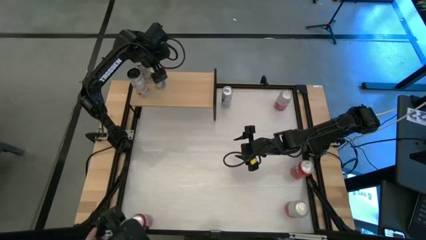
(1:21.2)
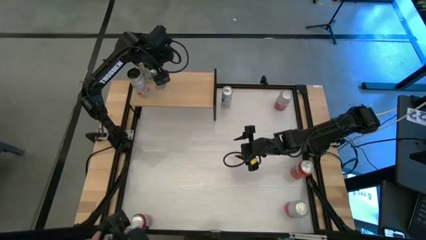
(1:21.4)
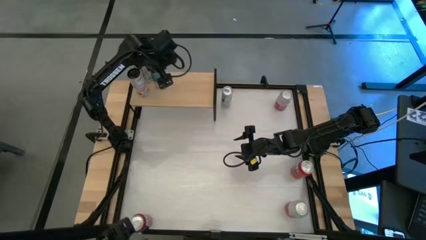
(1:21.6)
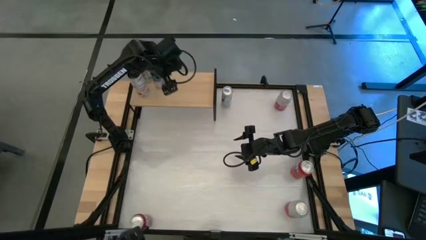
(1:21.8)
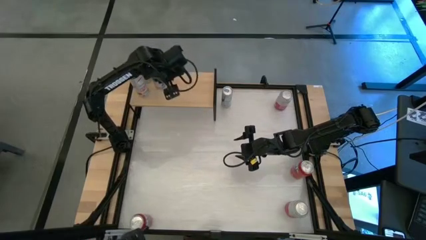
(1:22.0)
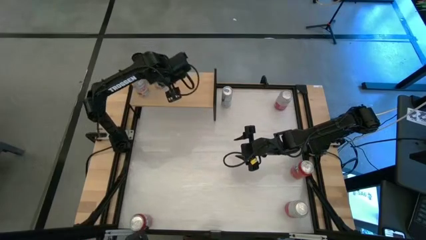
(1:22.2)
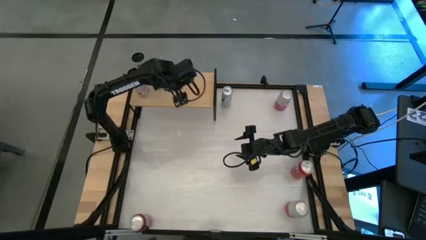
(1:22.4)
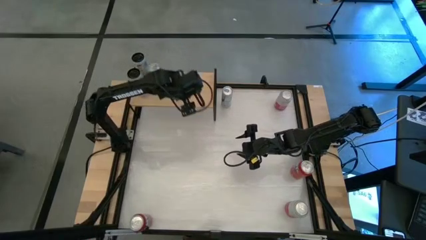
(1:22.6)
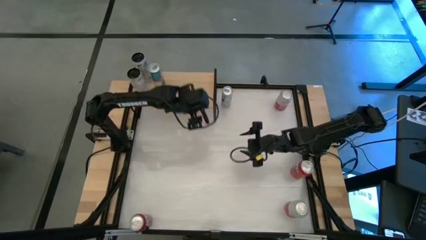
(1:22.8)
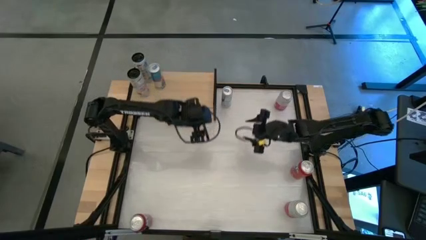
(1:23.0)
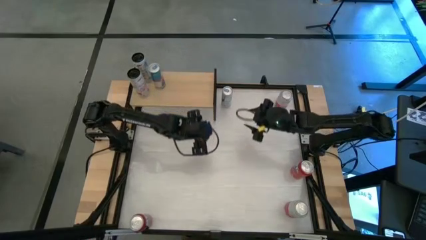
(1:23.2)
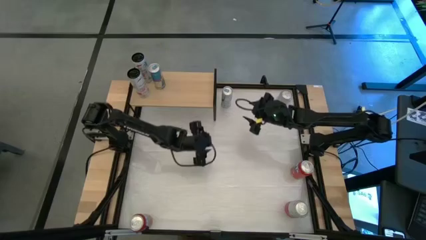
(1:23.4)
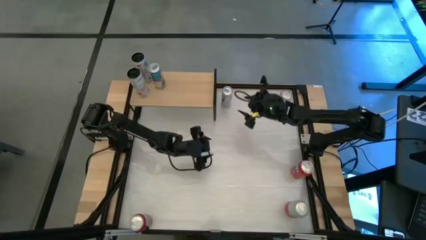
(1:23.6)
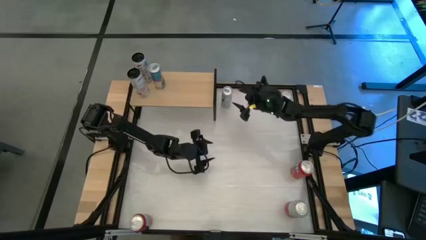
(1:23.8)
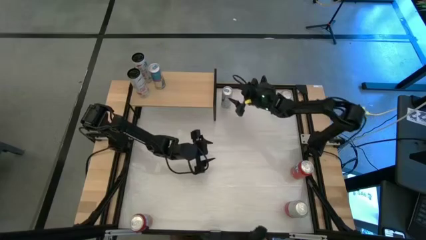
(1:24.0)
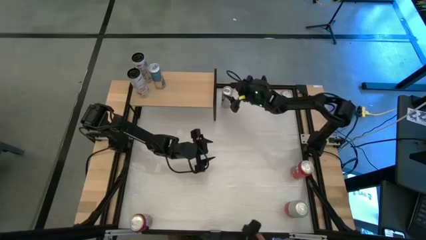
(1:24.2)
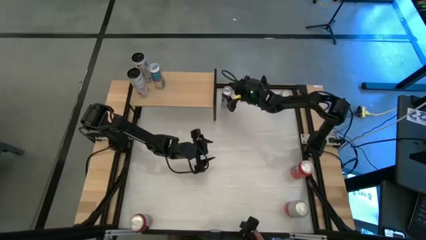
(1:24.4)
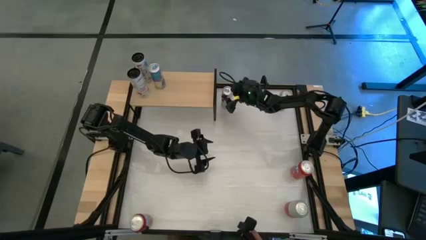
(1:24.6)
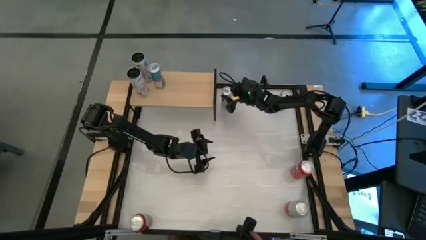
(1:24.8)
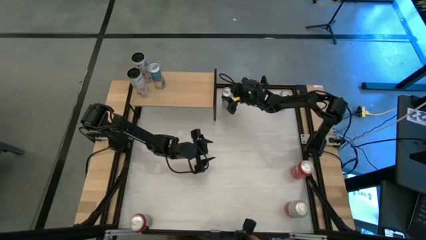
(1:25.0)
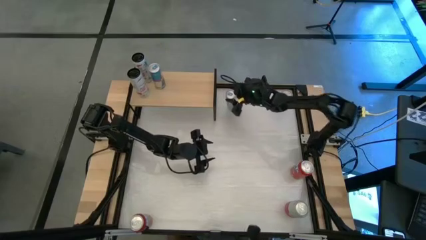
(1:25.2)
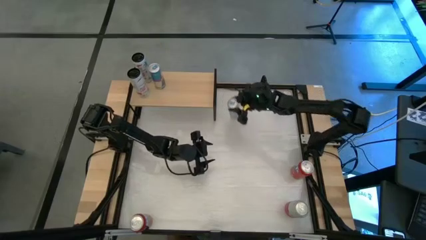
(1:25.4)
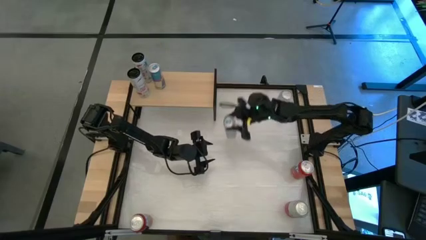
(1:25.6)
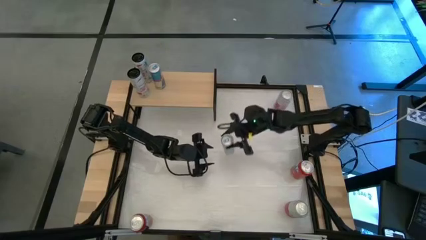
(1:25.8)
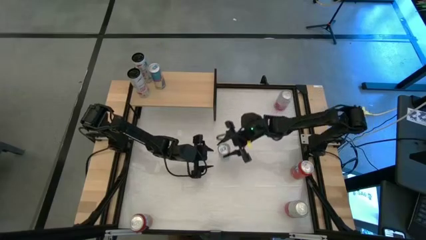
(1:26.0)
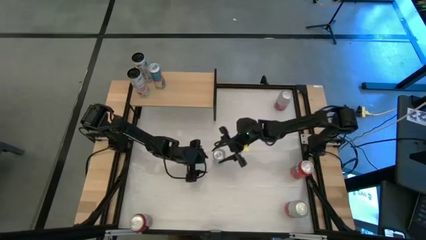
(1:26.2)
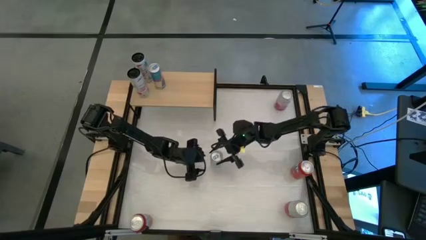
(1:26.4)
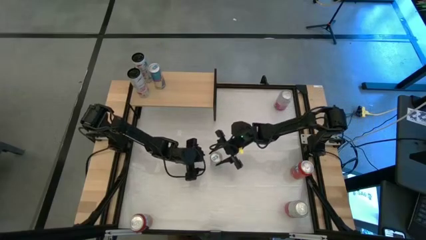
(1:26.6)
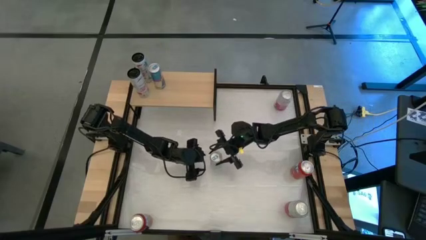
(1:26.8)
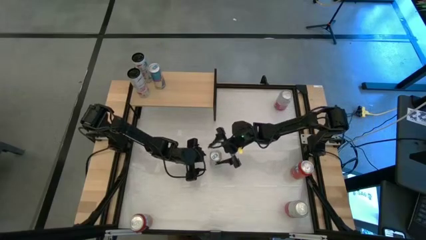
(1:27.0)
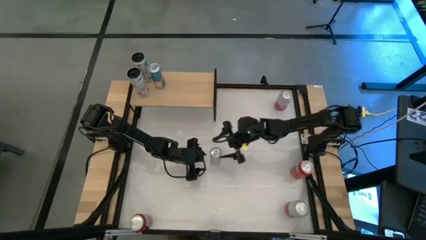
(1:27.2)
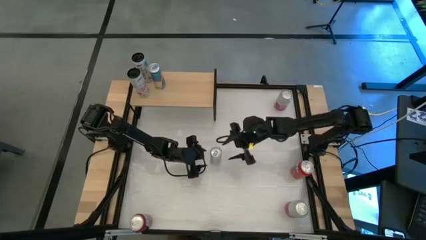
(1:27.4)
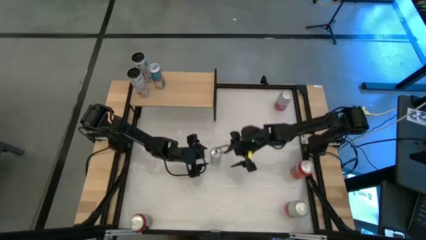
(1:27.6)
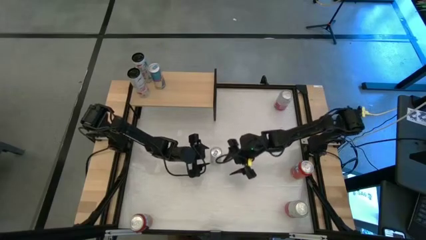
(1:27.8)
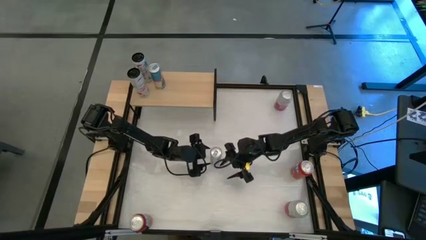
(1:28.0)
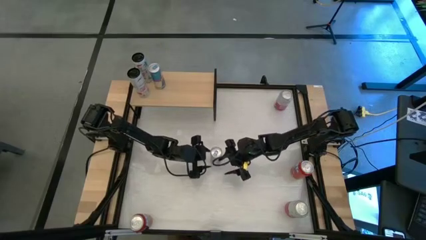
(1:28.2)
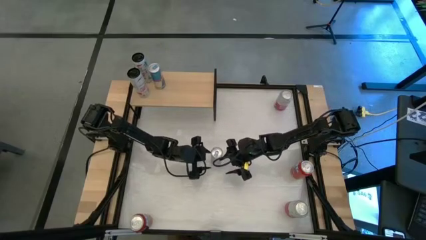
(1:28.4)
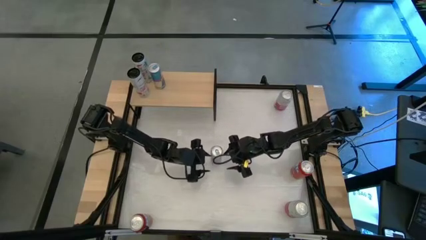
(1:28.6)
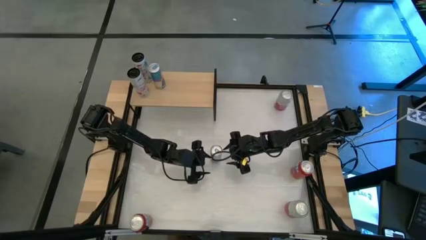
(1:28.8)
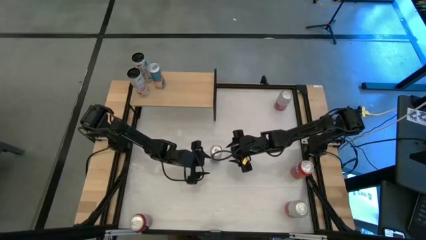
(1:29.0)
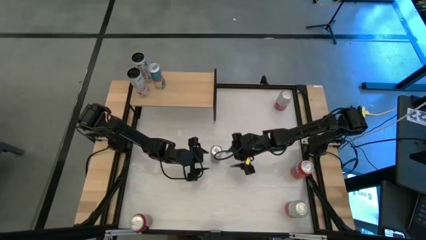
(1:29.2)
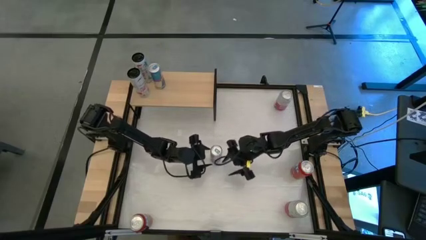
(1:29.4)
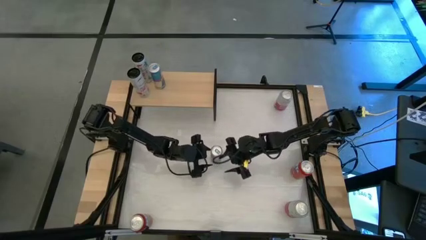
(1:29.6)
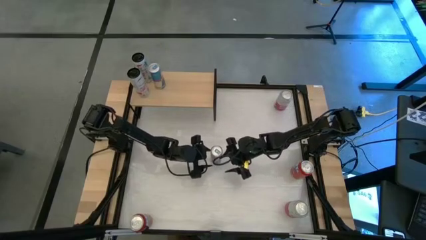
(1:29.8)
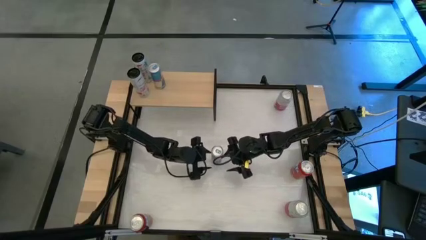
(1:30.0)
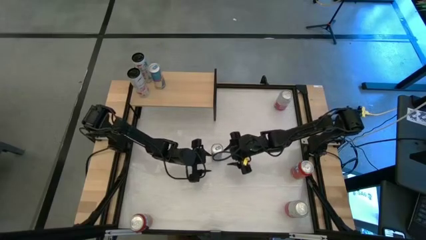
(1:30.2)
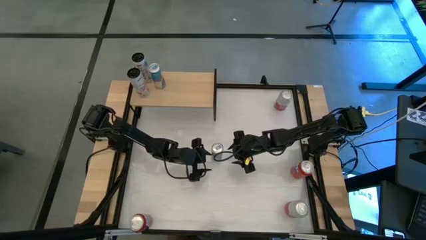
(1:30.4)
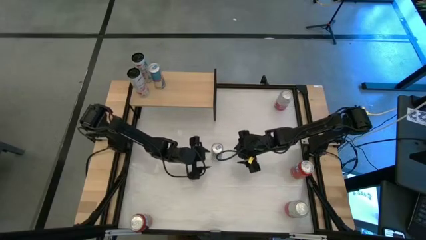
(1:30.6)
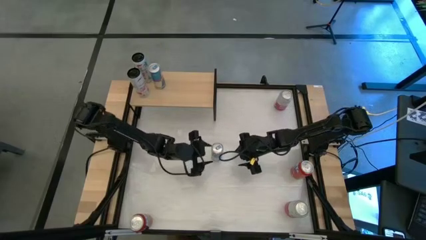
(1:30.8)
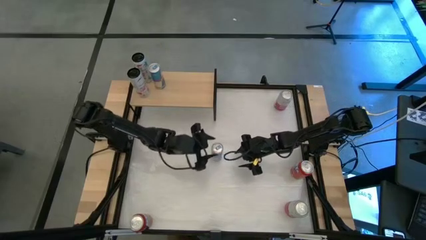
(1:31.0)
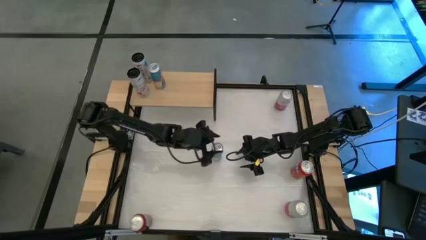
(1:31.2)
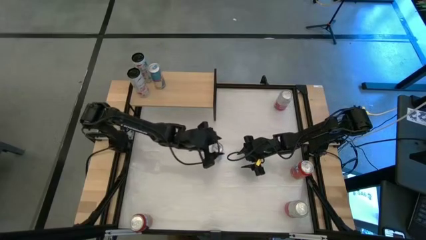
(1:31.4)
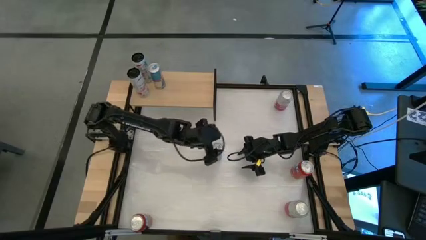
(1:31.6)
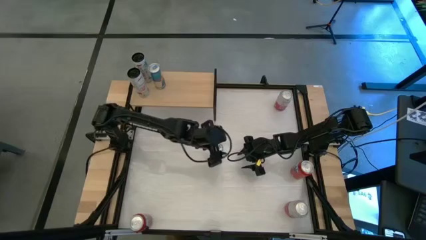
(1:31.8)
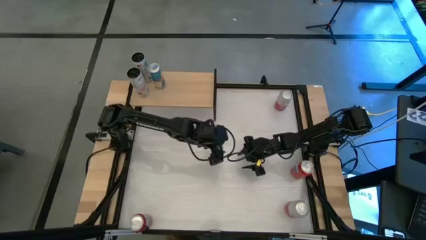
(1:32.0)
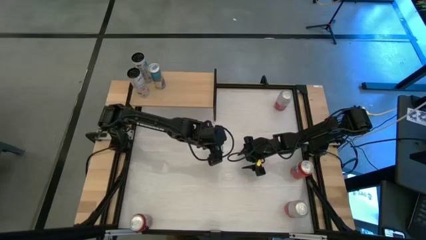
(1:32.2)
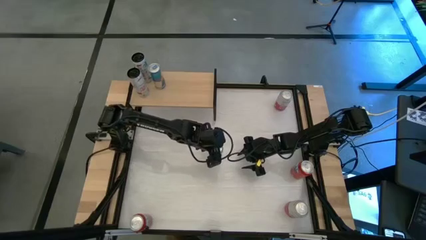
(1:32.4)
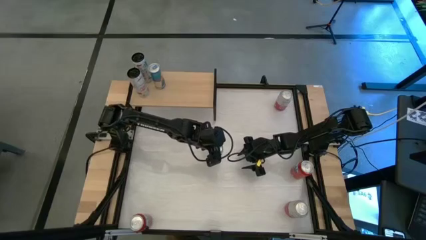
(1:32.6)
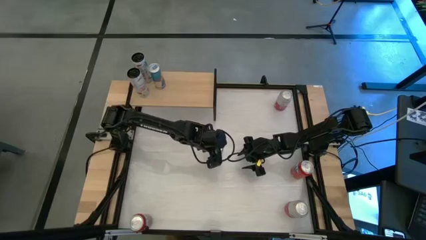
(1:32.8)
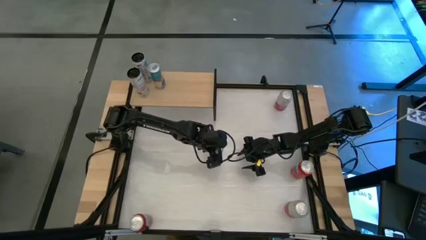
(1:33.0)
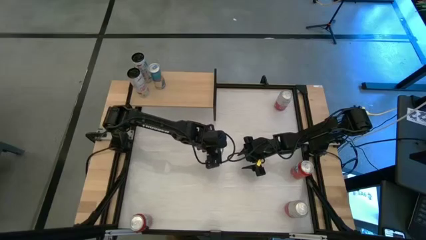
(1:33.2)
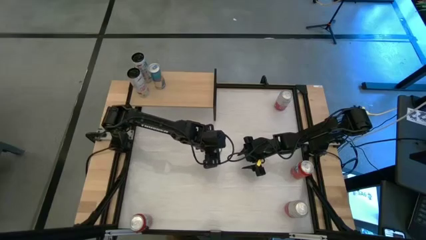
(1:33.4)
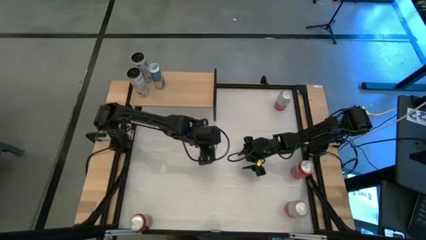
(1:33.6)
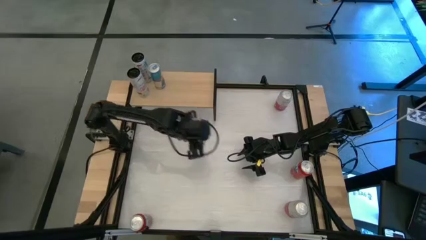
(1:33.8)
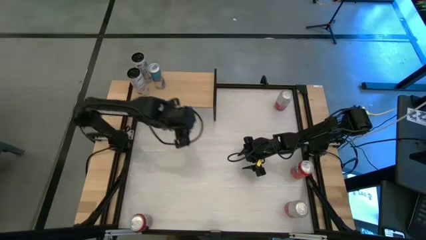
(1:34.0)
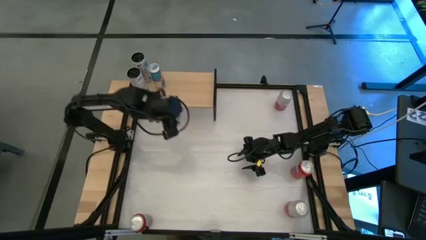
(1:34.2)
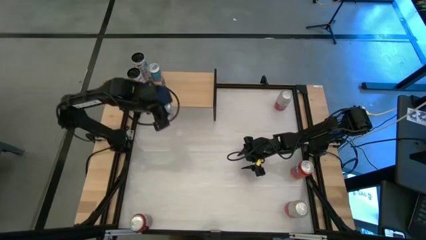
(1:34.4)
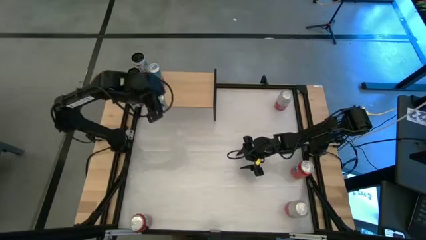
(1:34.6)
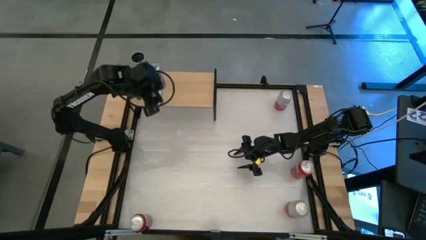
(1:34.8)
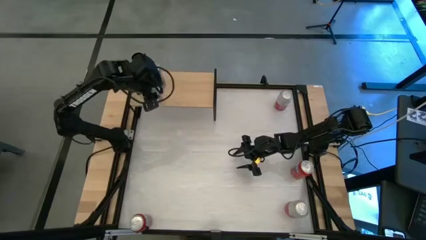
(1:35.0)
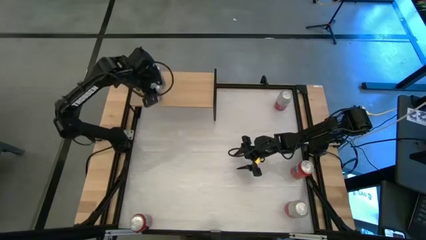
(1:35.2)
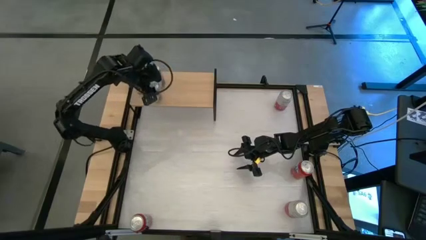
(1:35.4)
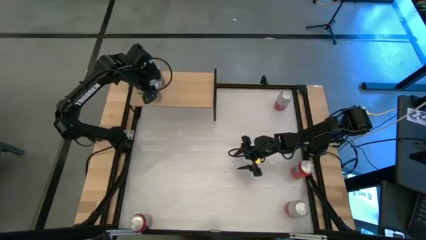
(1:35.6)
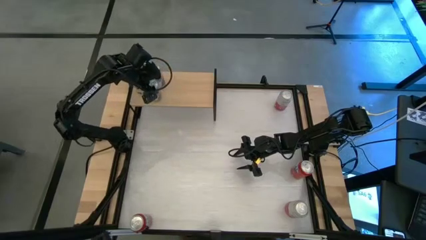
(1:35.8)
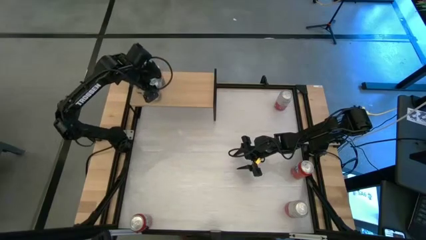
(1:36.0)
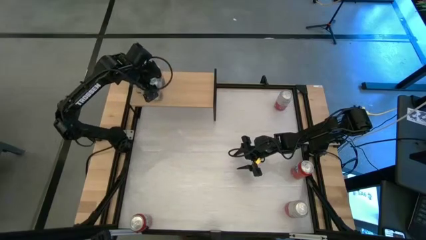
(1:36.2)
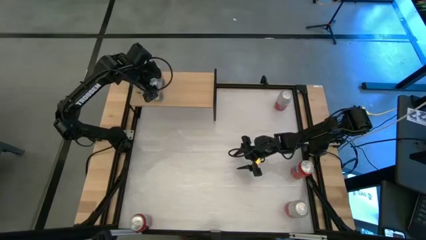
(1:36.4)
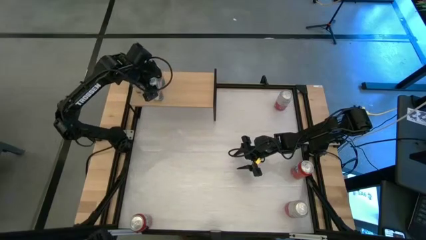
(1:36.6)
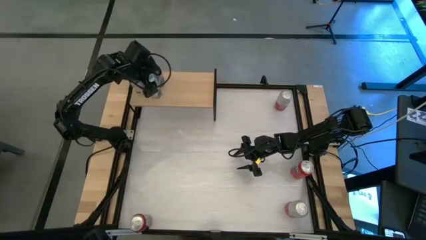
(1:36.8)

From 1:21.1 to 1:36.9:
Task: Place canned beverage on shelf
Put the blue soda can on the shelf aligned with the blue soda can

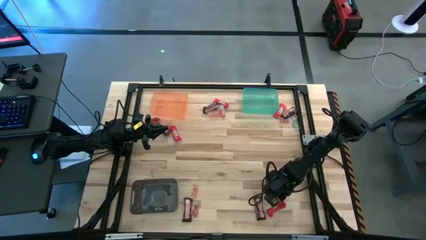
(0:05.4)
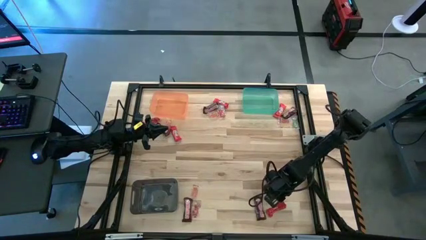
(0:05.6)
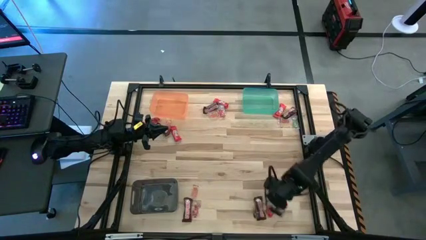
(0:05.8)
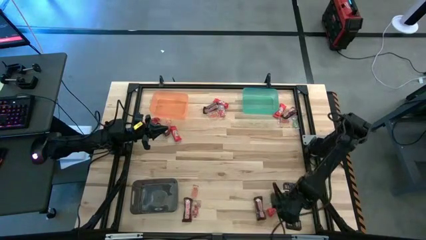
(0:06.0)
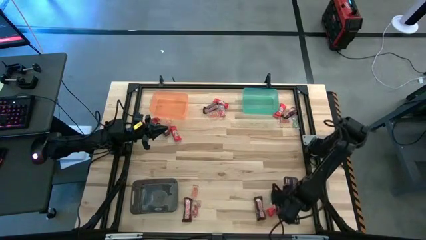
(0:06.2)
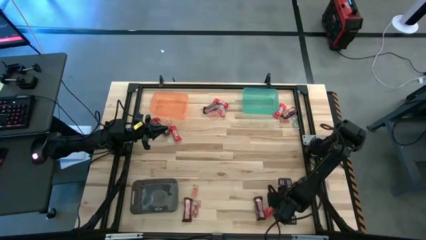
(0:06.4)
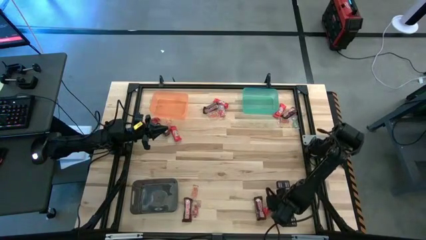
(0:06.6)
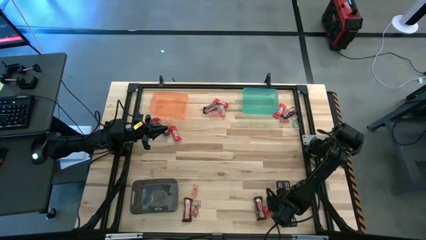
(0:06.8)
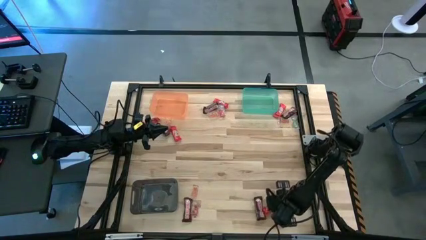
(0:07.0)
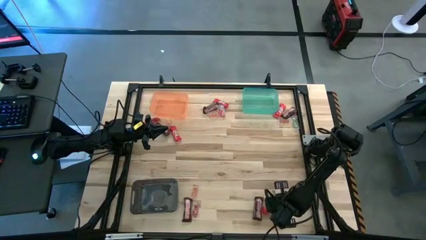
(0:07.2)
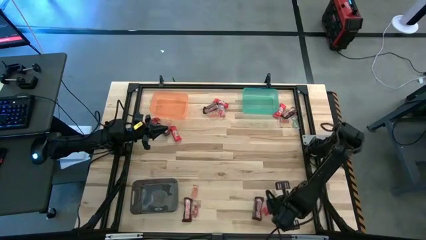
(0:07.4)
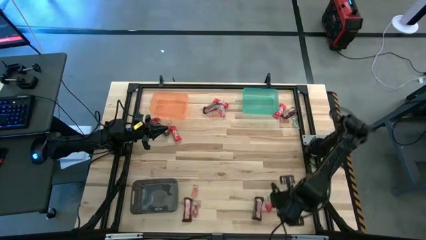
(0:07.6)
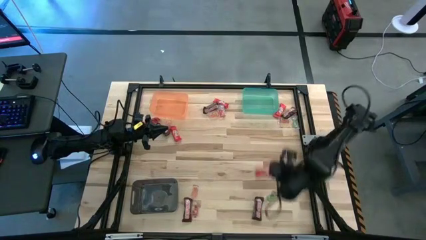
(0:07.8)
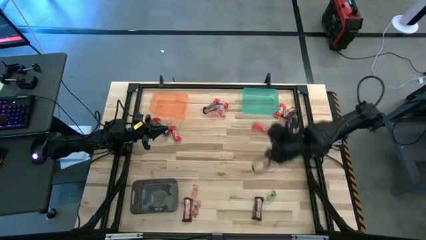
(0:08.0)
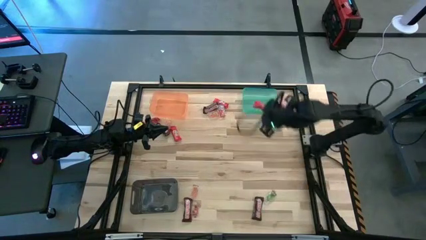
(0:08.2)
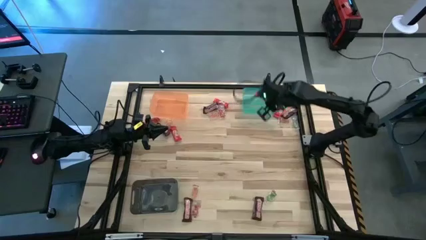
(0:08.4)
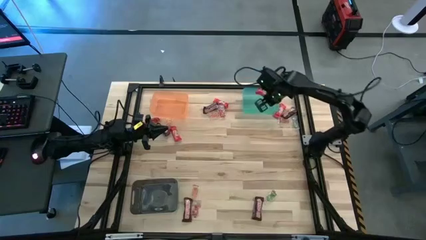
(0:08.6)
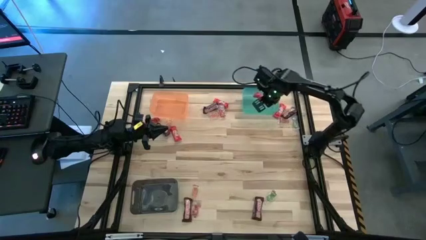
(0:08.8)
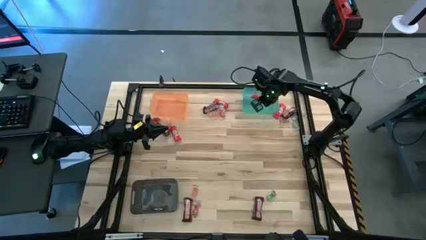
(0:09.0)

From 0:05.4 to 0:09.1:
Task: Sort candy by brand, put in halloween buckets
Put the red chocolate bar into the blue bin
